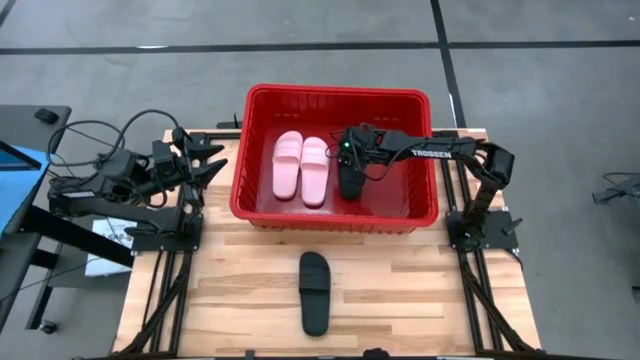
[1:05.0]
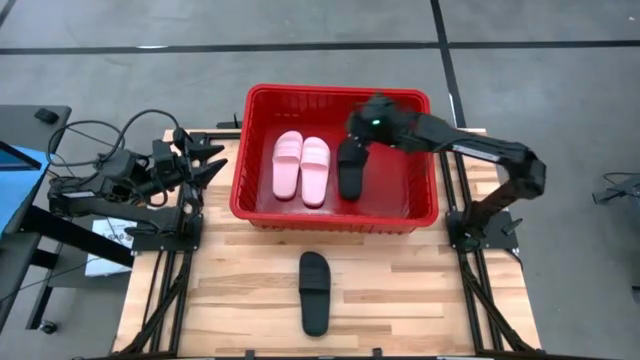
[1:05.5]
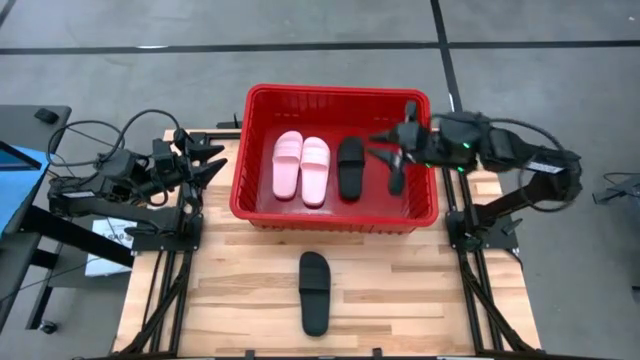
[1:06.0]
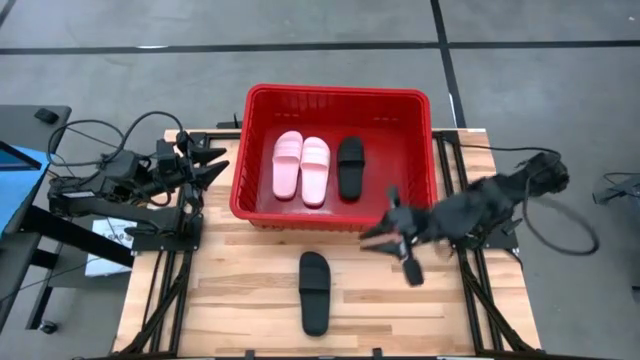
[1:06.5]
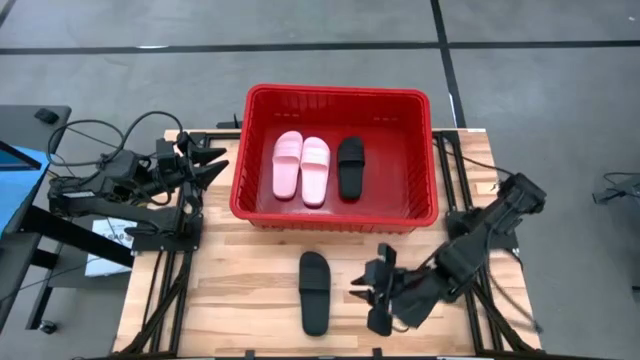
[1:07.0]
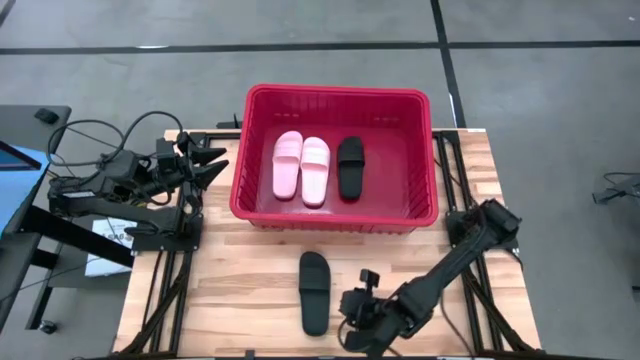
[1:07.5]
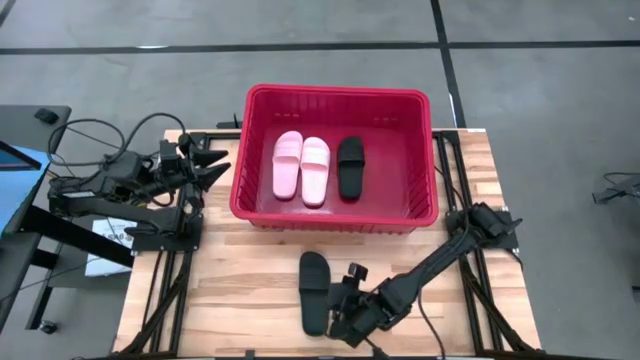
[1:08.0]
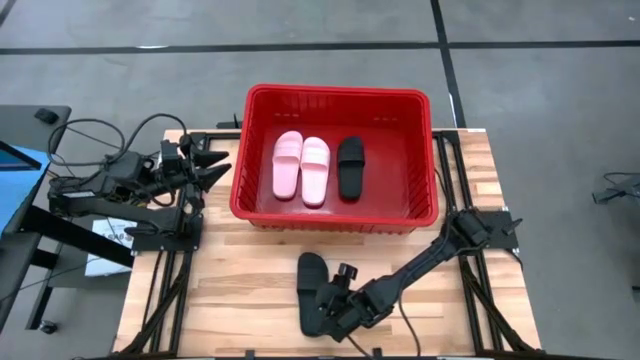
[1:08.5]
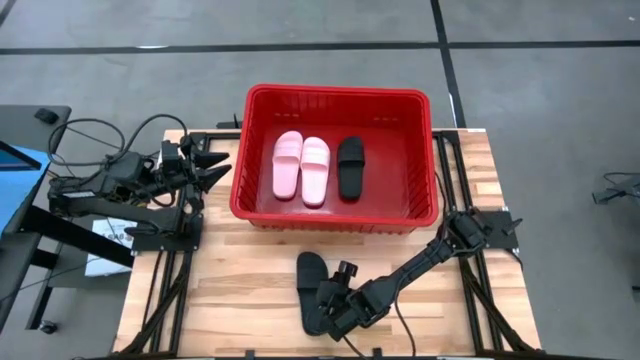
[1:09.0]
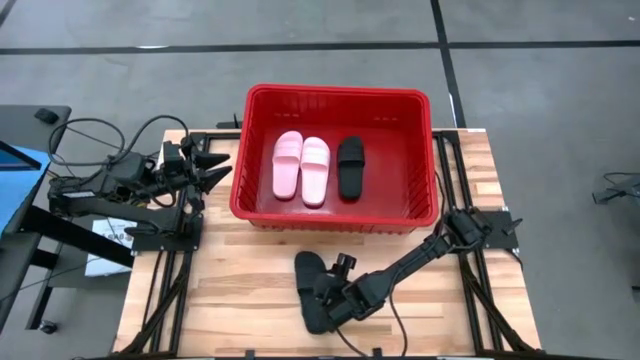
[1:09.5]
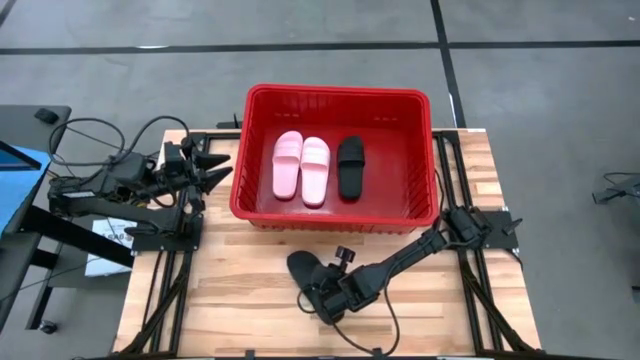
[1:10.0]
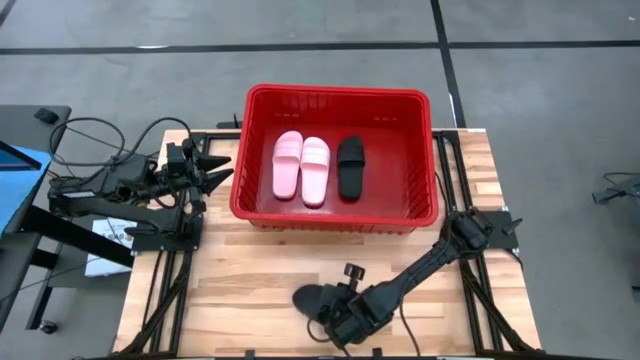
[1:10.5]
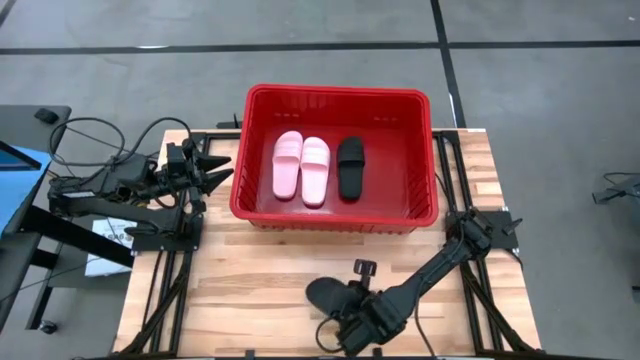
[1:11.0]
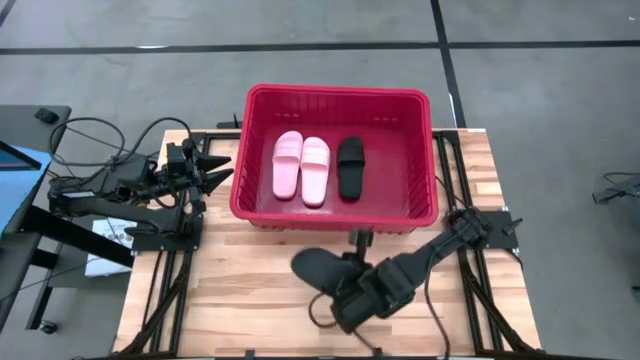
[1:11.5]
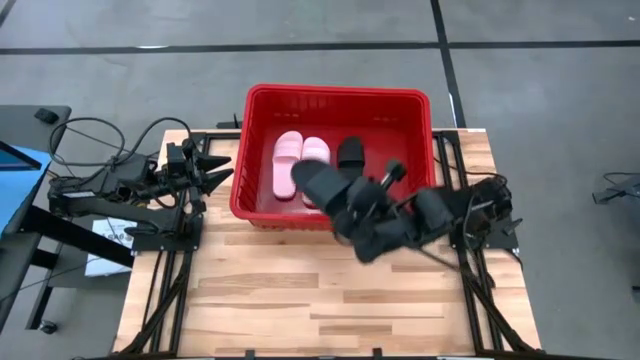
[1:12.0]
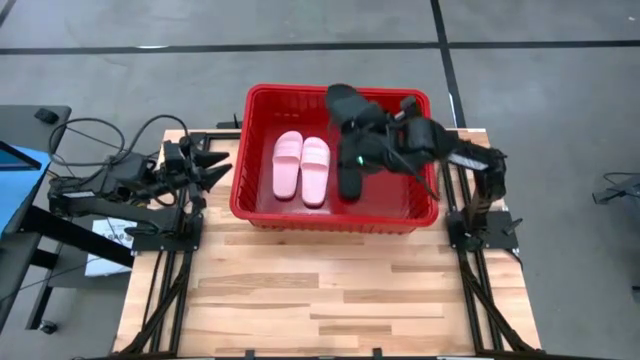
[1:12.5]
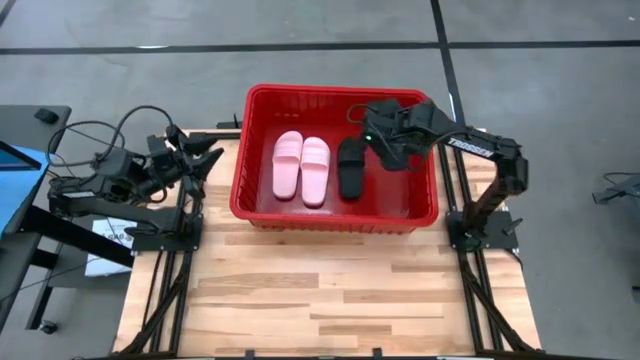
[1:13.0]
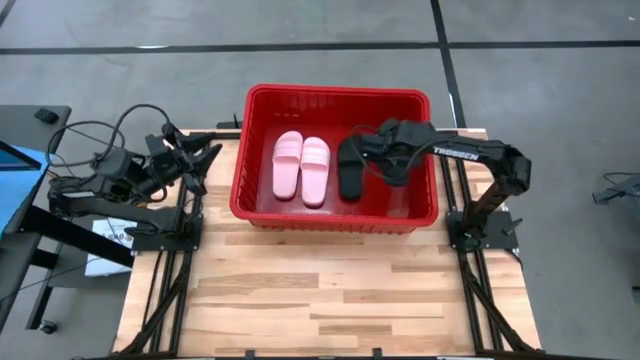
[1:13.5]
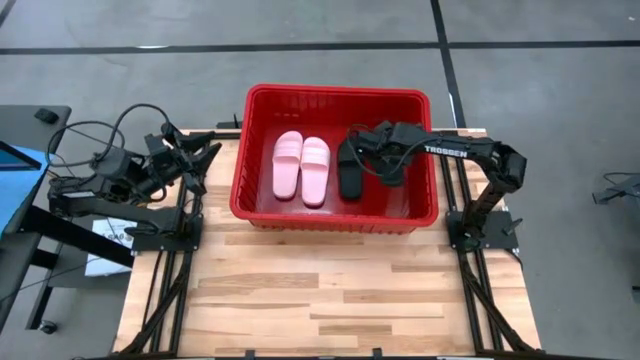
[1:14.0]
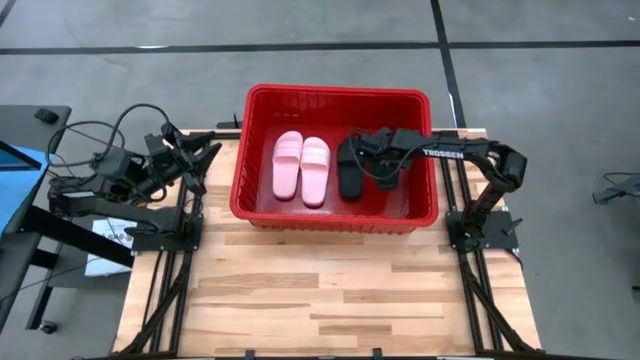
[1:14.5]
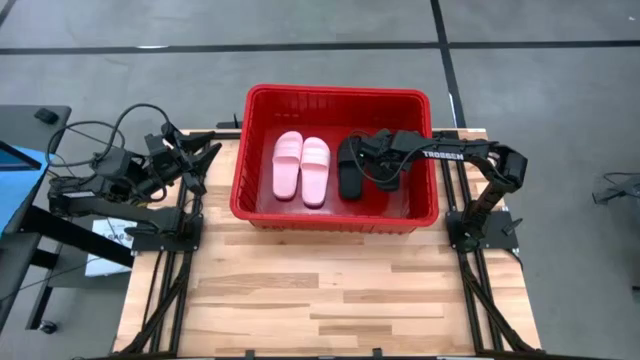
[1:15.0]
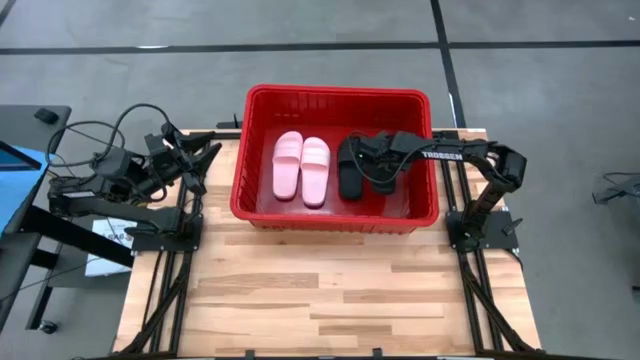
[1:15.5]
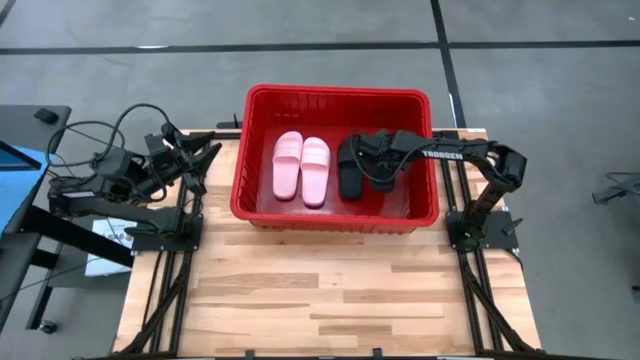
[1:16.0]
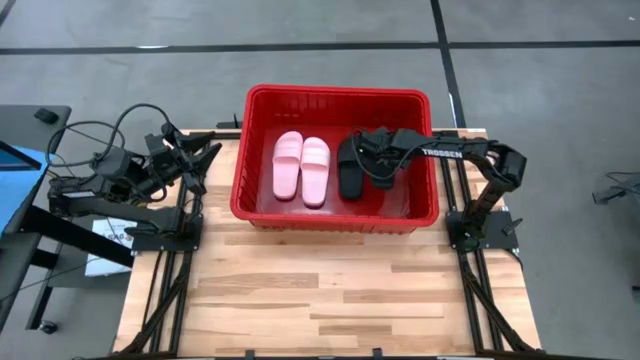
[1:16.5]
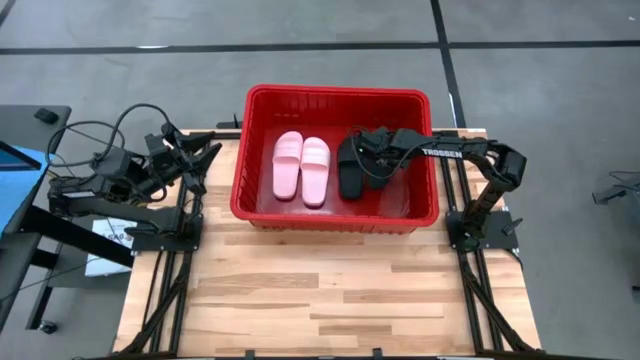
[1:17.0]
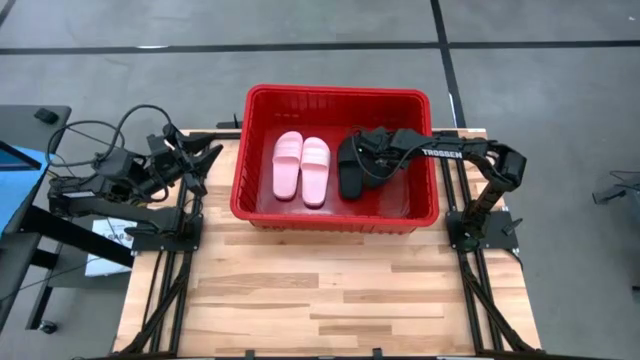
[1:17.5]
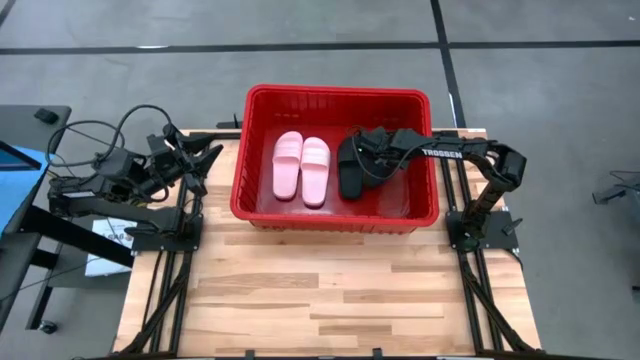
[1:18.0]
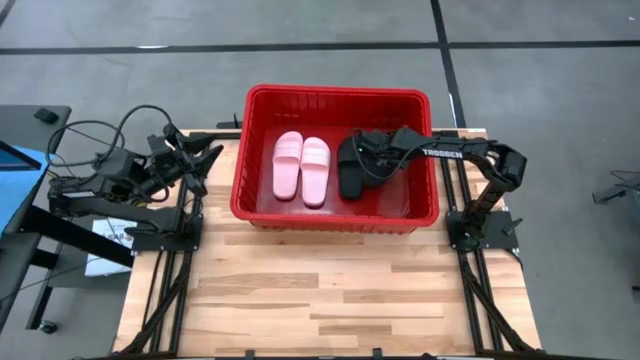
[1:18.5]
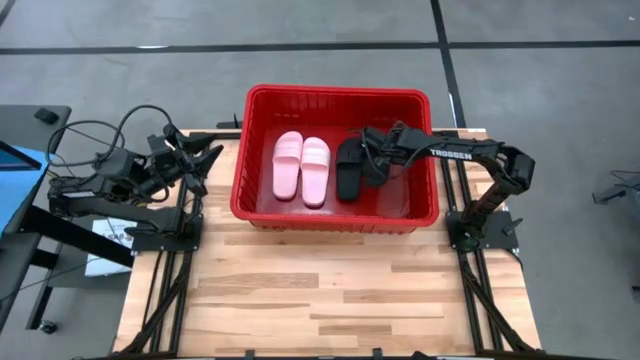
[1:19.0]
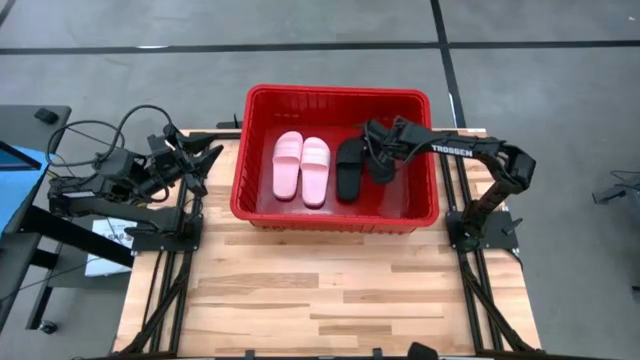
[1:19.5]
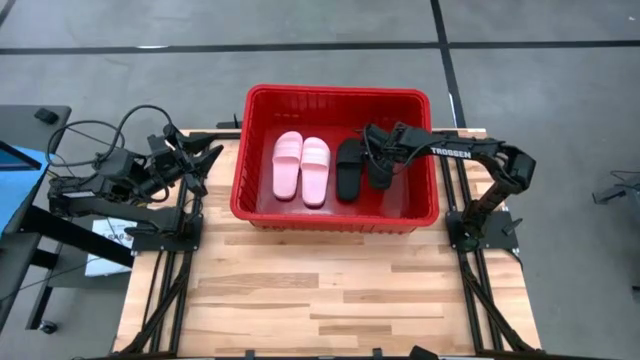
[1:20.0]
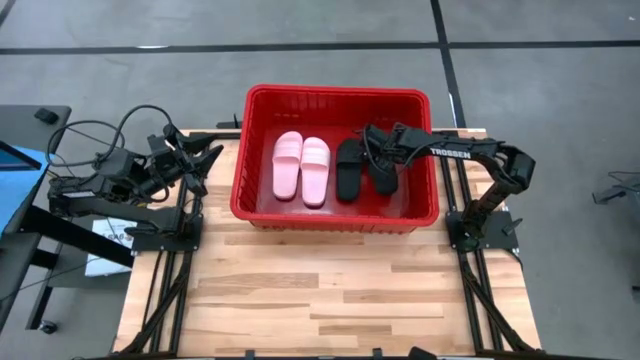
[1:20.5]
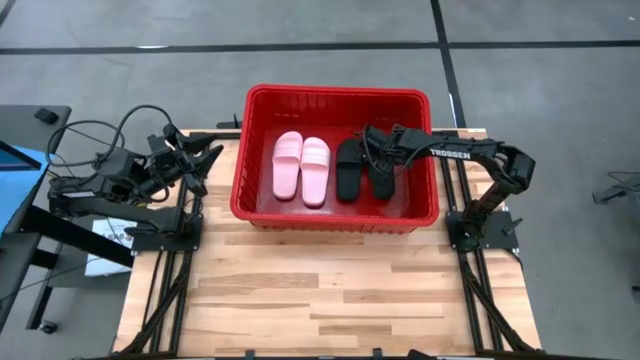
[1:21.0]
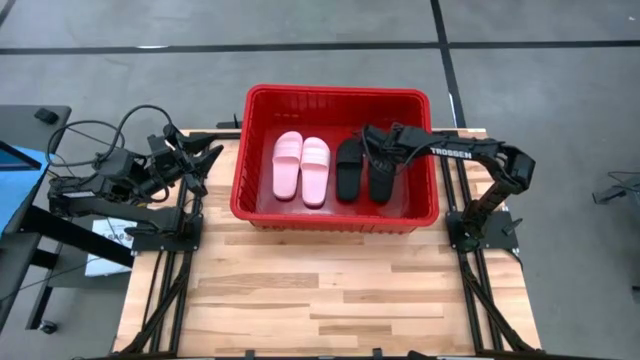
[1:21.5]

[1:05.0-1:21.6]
Task: Pick and place slides into bin
Put the black slide into the red bin

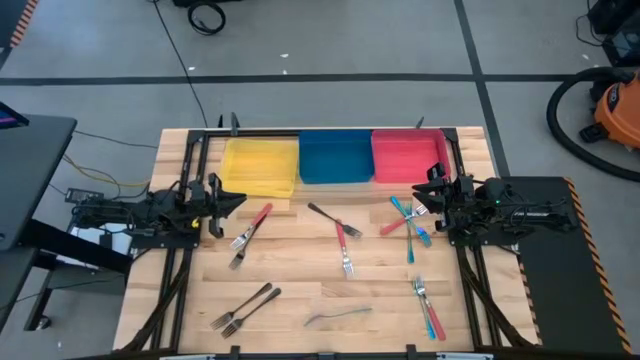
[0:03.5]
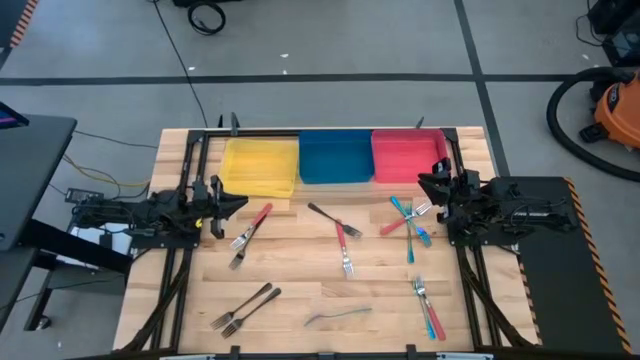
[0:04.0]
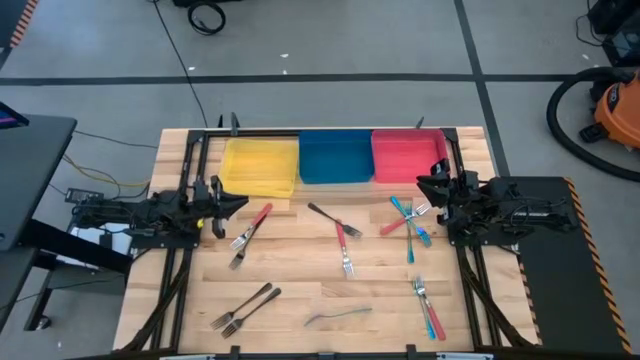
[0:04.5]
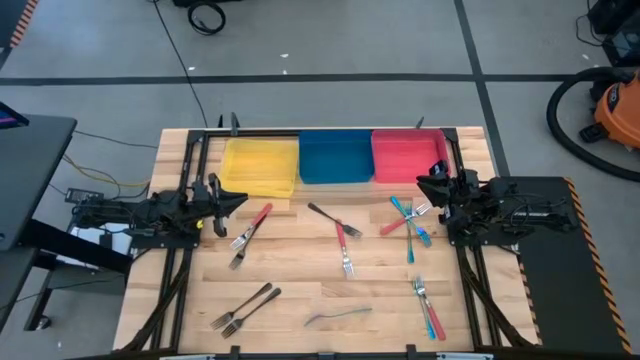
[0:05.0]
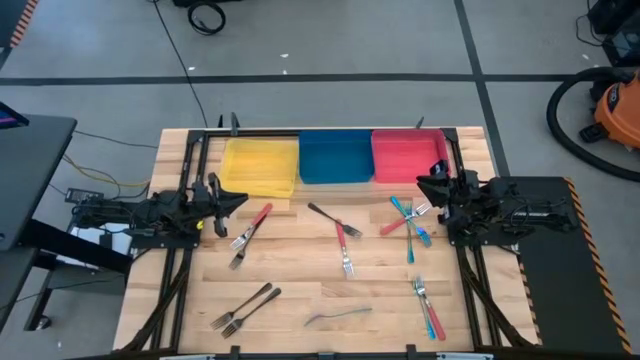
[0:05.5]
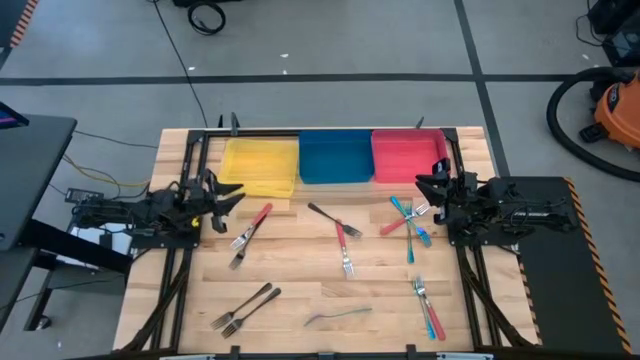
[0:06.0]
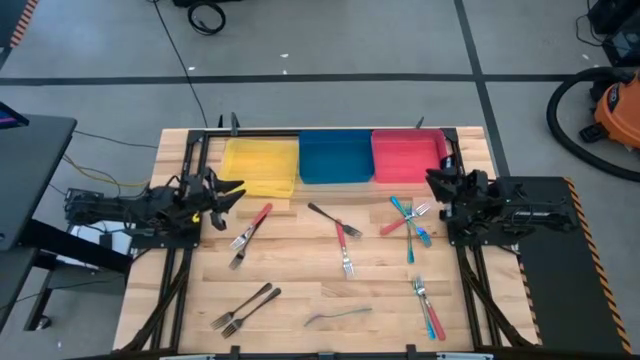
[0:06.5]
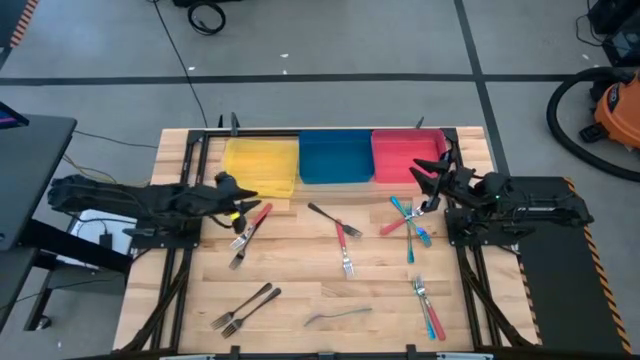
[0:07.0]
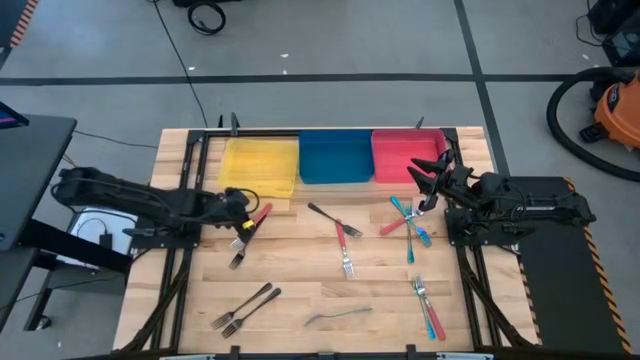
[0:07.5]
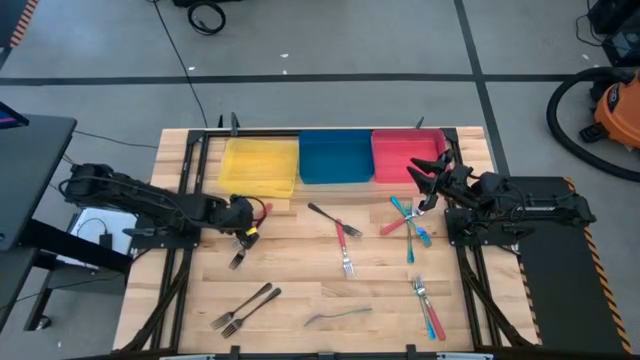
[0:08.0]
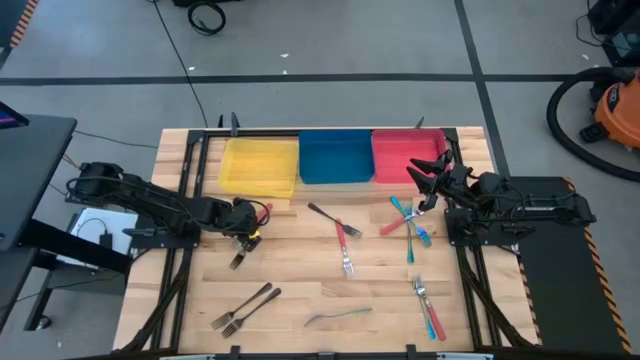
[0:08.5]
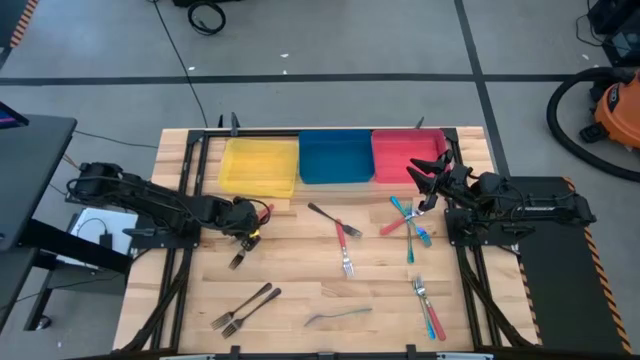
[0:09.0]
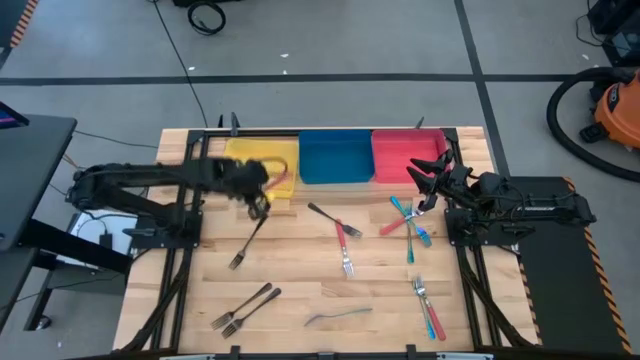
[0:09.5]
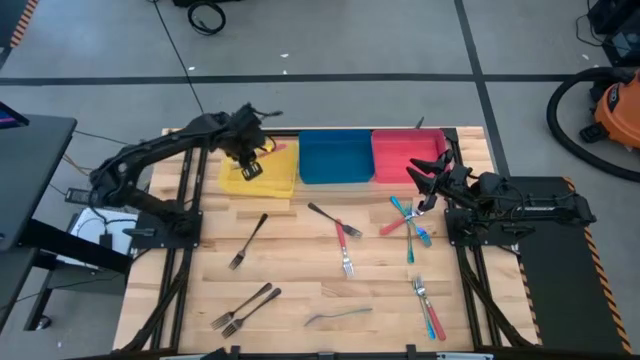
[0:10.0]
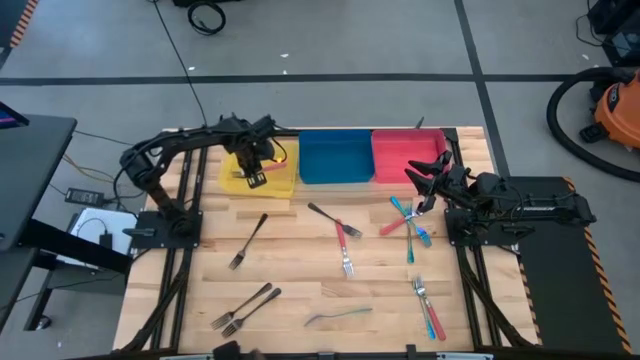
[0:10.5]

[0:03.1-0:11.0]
Task: Sort silverware by color (type)
Put the top left pink fork into the yellow bin
